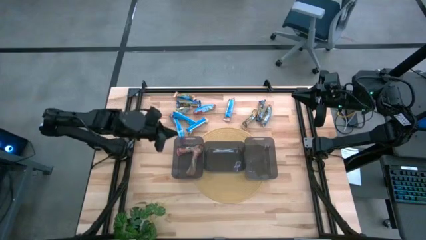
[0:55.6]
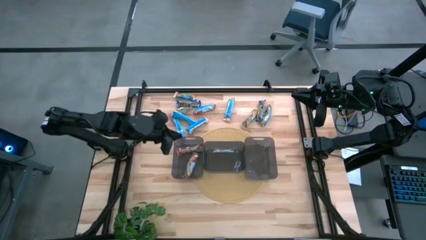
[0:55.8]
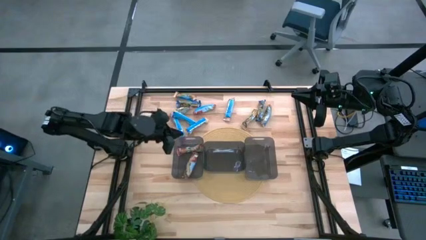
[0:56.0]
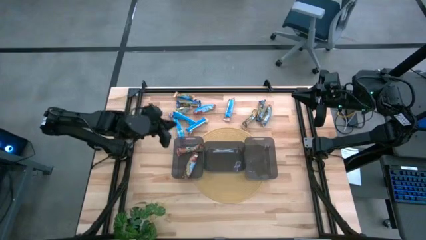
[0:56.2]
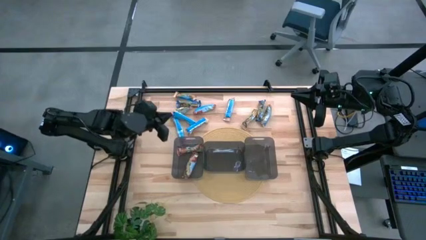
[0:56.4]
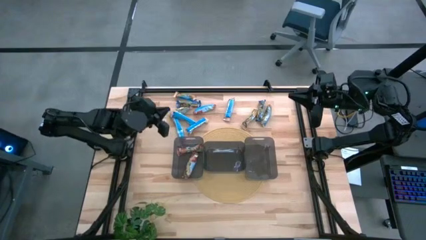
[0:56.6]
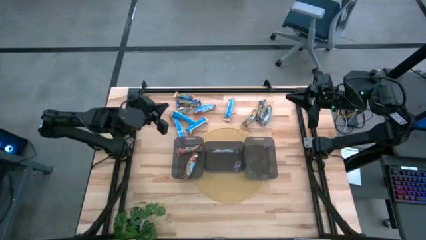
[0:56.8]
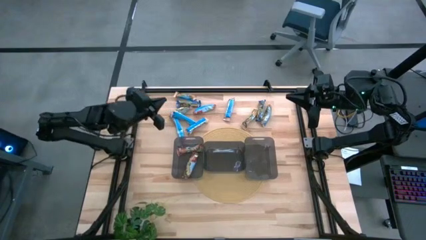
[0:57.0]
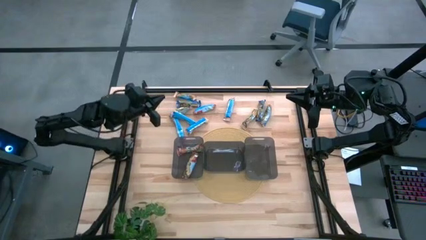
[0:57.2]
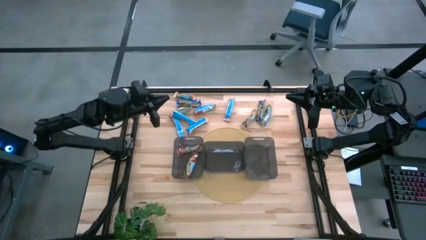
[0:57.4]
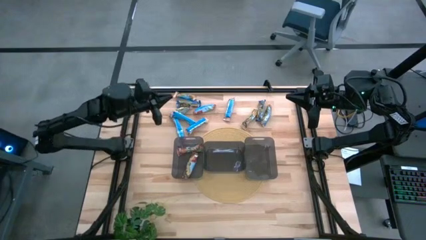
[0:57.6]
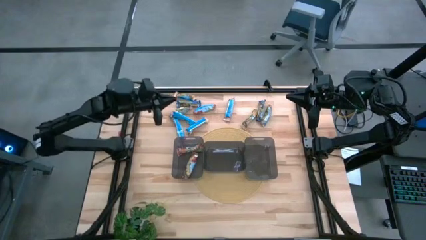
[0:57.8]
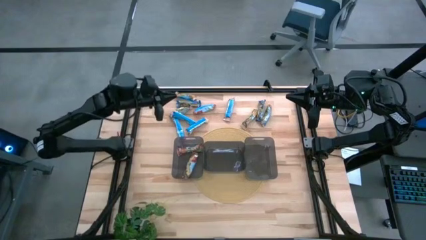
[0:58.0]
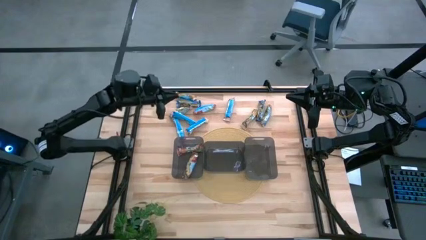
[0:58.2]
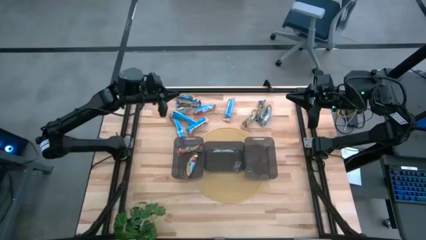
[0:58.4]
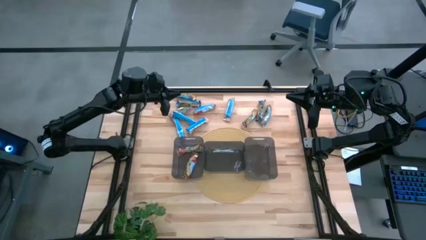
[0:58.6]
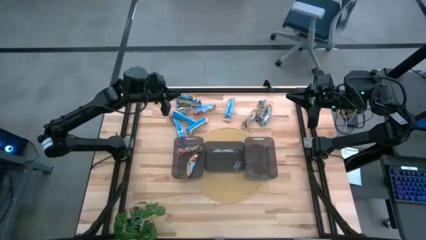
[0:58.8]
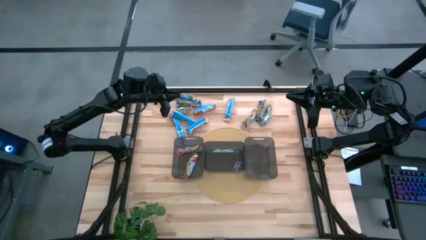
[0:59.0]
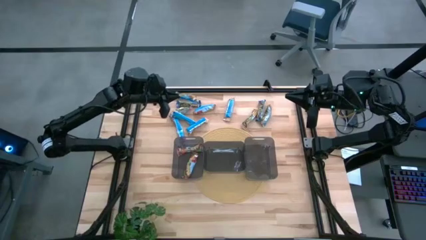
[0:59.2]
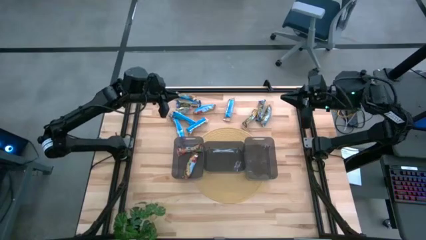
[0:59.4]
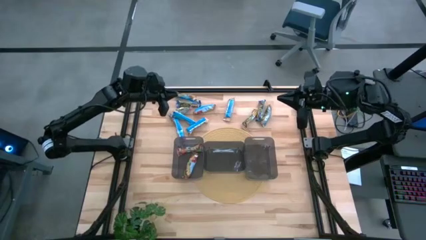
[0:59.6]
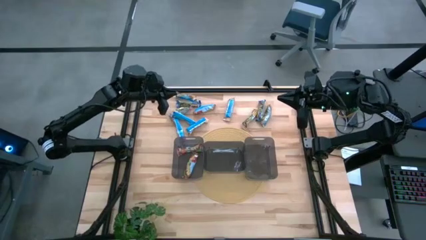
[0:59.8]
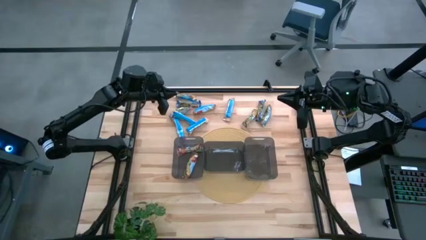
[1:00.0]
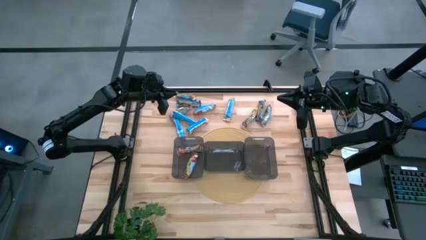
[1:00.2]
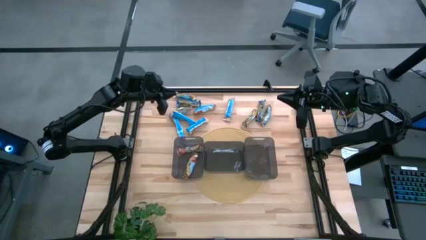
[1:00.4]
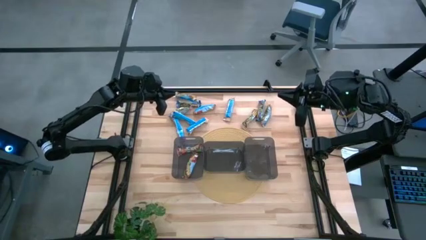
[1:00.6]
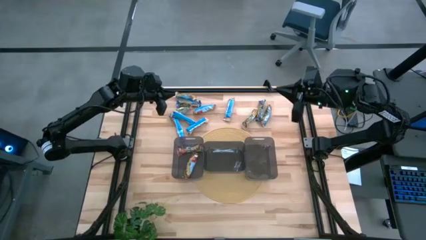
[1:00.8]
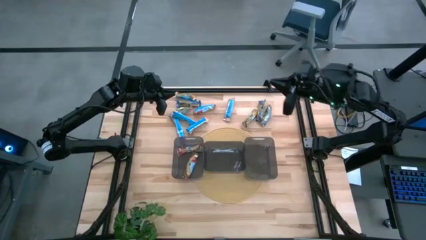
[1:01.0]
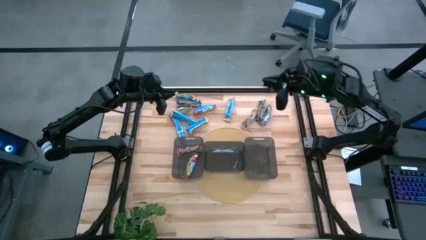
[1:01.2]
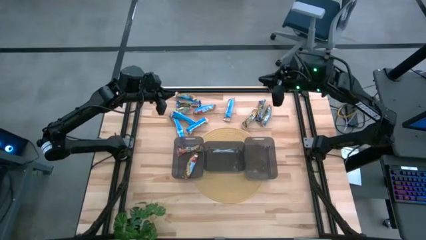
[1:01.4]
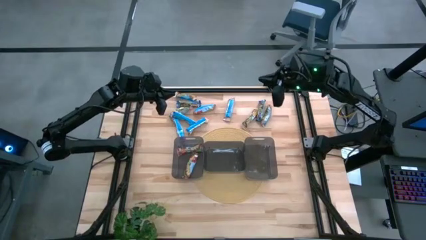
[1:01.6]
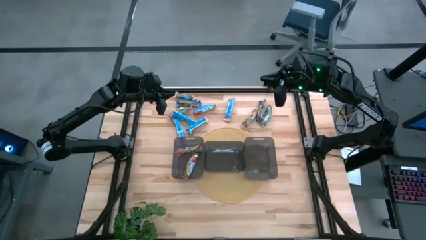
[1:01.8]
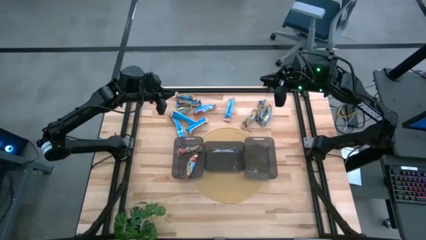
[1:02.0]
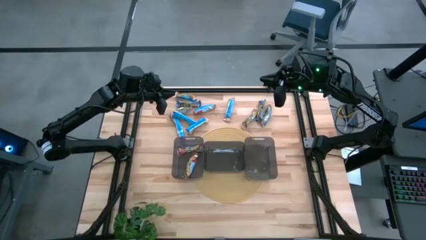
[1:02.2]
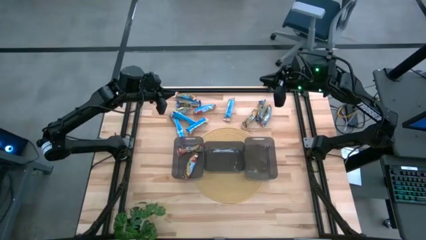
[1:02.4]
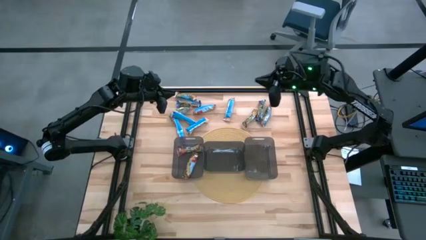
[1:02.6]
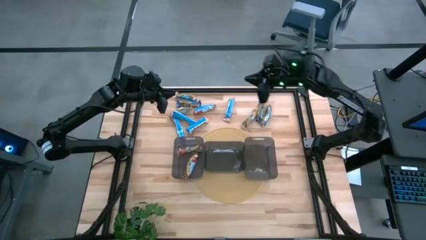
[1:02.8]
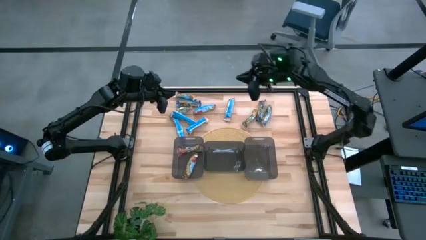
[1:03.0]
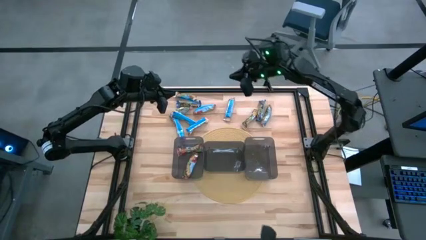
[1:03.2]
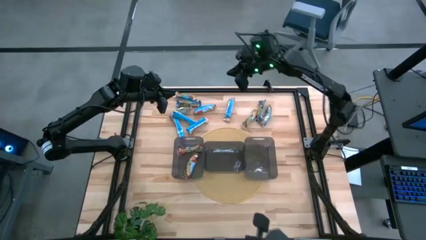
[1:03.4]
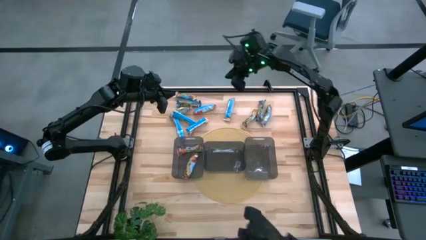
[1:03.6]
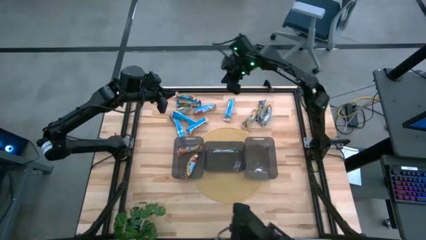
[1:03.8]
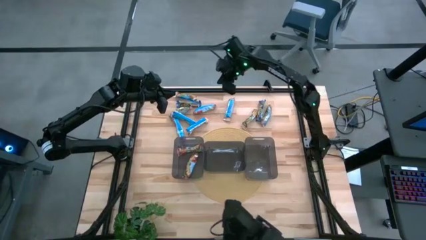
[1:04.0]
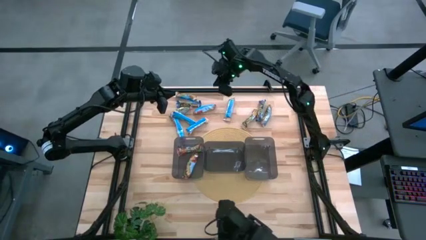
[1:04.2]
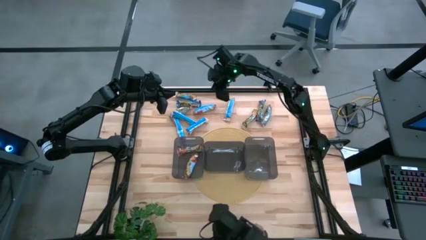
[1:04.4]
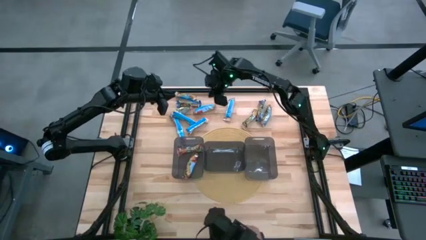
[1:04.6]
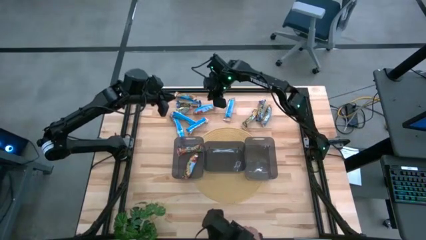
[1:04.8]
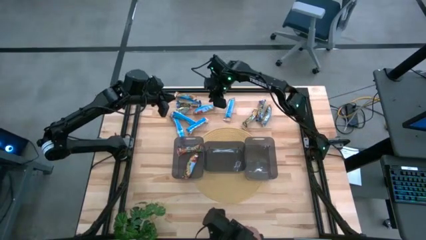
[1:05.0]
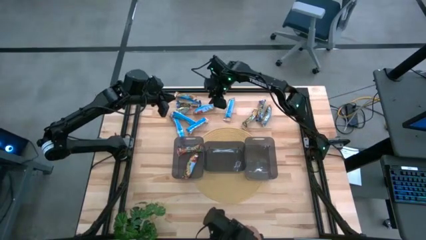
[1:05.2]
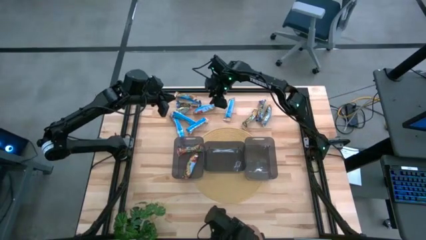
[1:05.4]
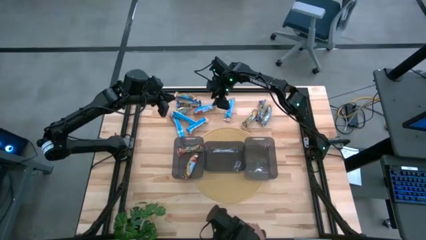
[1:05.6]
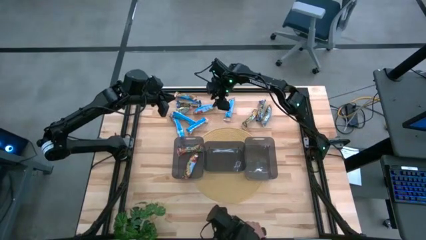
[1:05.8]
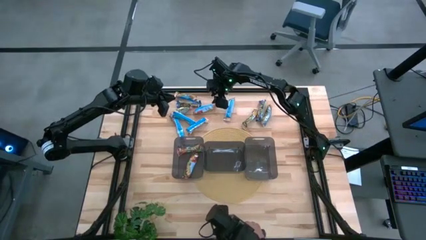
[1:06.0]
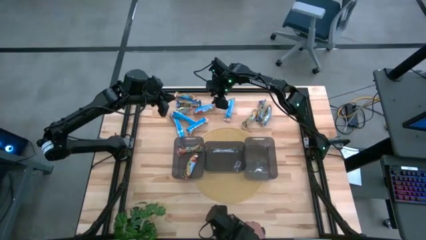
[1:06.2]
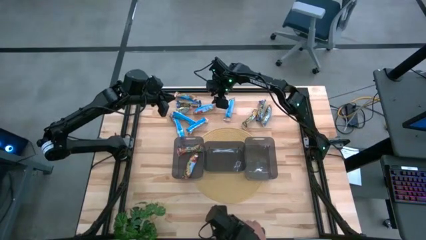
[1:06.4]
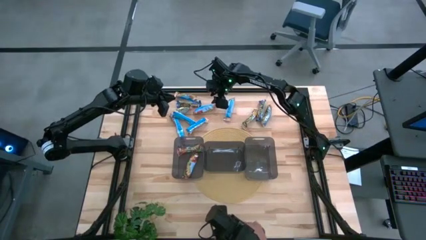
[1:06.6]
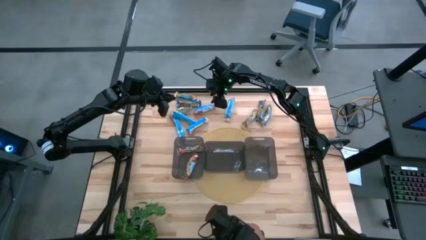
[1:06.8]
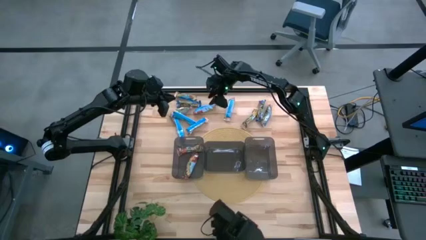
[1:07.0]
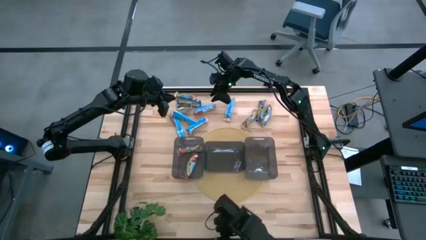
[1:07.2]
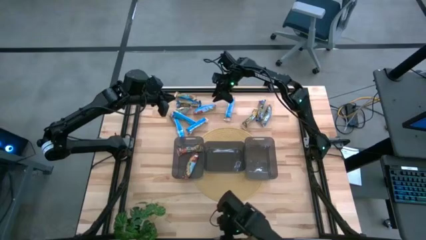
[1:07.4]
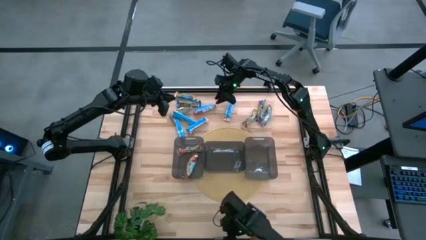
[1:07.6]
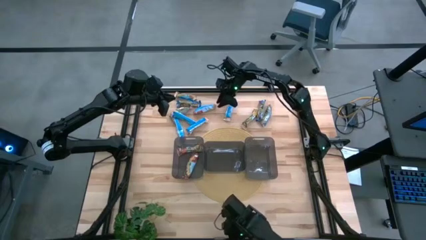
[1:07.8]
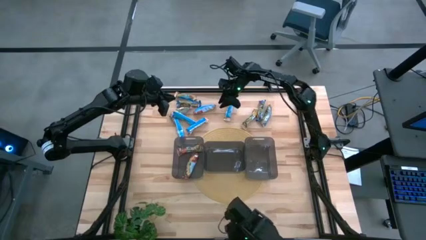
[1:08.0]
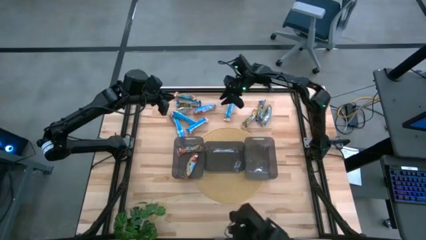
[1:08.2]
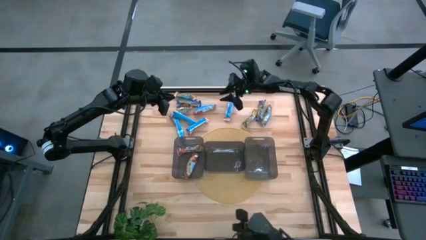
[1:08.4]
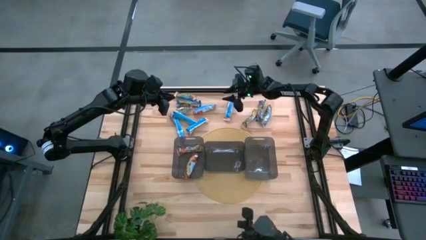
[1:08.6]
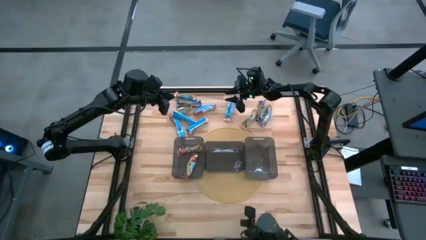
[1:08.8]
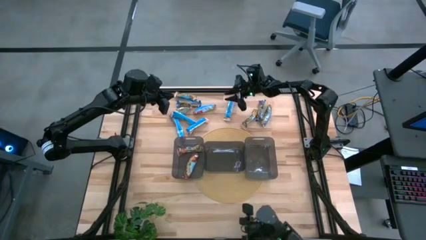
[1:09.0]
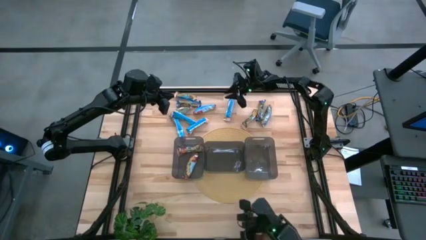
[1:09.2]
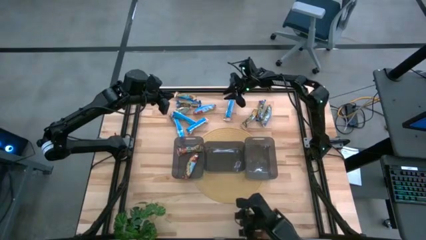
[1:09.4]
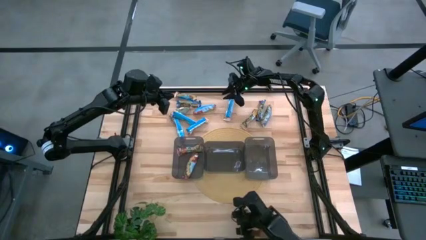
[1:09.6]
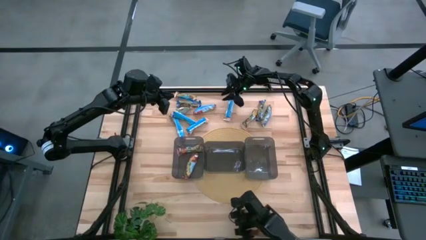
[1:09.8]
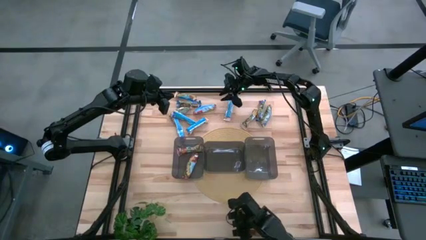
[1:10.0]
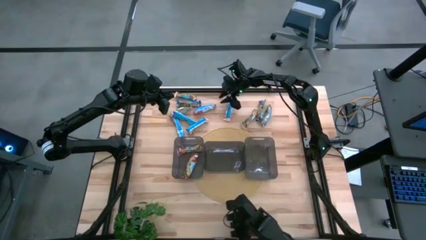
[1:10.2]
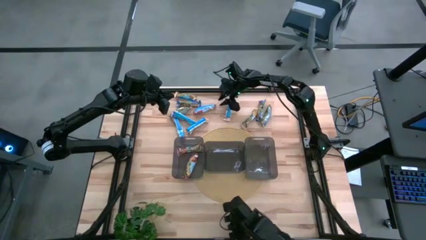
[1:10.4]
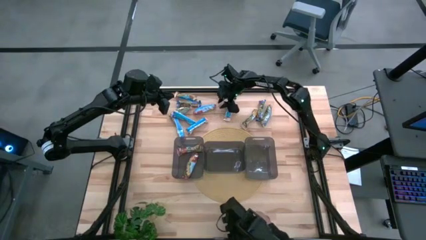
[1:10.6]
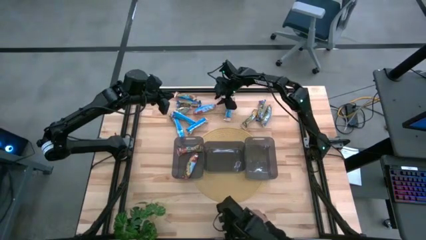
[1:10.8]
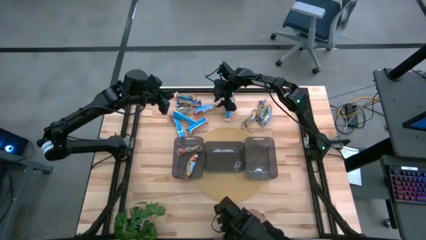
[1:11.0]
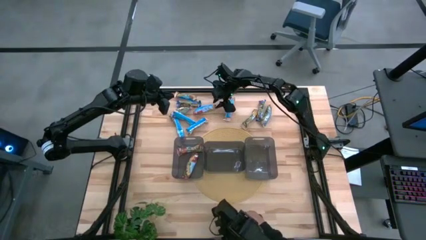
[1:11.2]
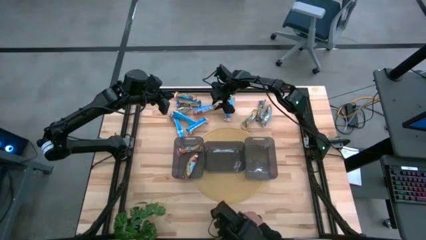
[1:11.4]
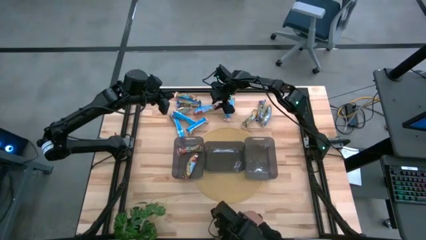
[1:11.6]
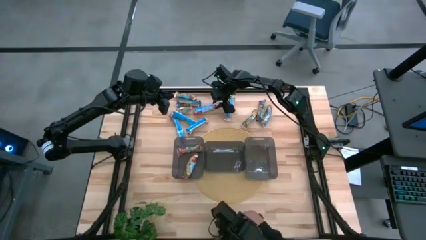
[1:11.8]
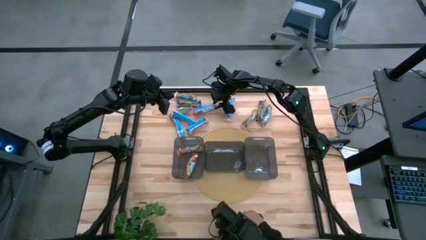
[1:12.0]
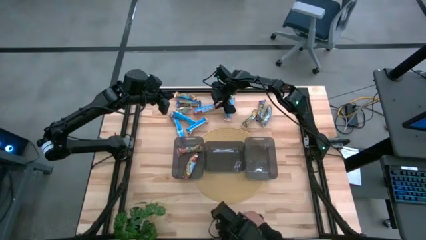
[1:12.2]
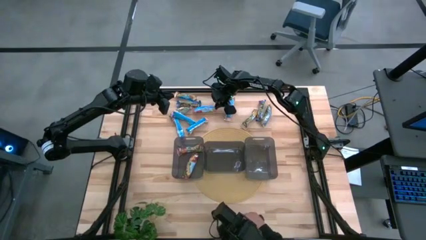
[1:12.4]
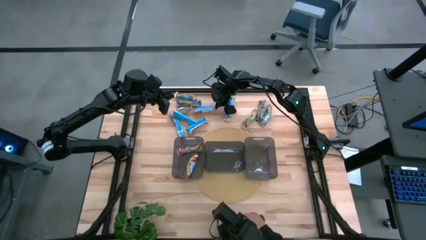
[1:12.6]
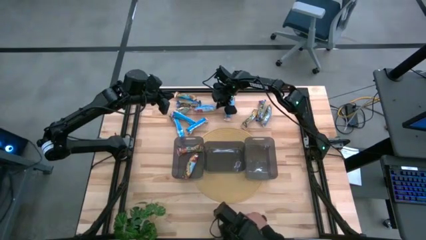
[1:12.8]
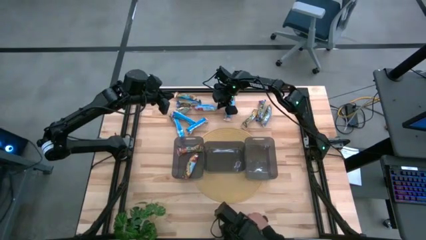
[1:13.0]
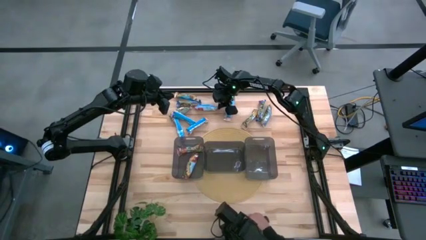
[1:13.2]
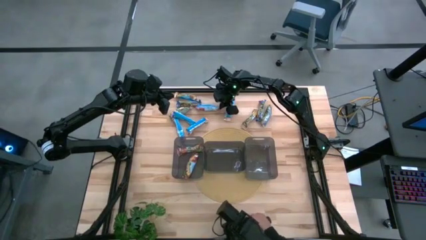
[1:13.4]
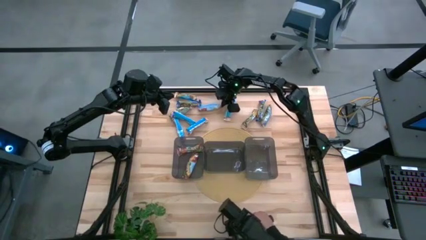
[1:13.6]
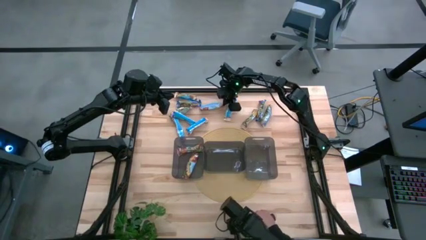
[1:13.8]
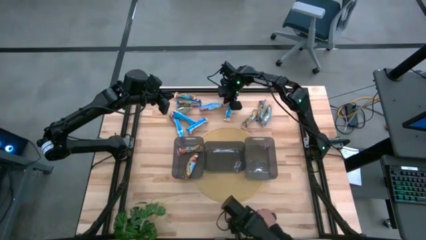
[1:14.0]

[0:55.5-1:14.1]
Task: Pick and place Granola Bars by type
Put the red granola bar into the left black bin
